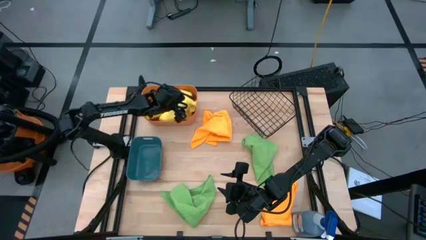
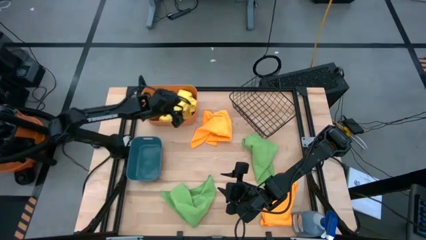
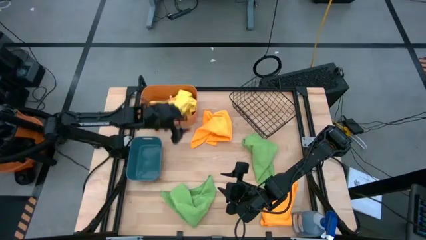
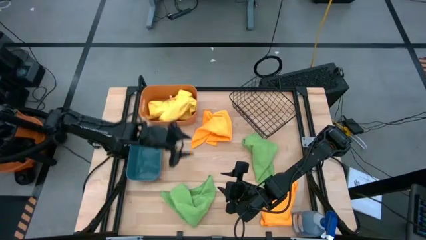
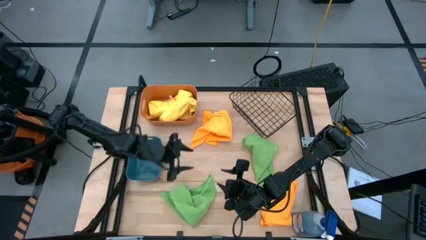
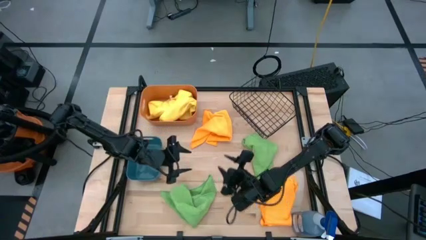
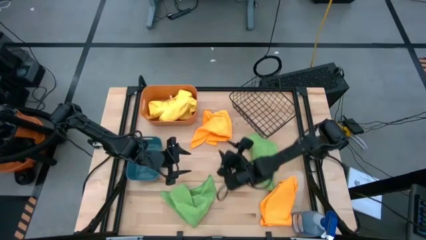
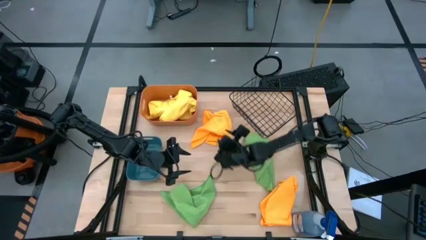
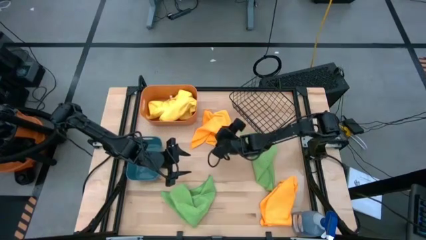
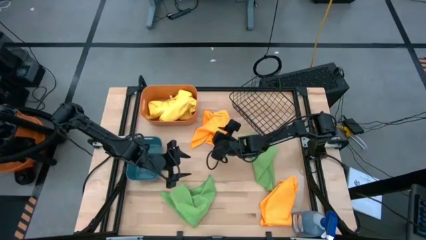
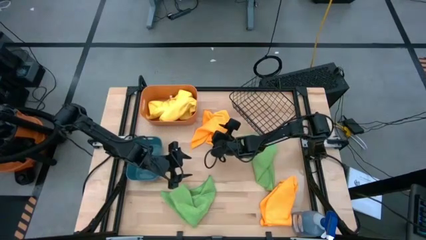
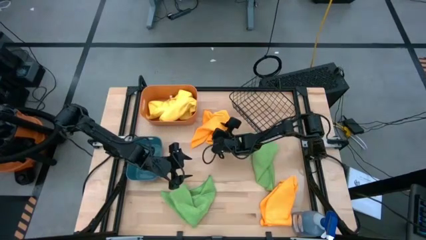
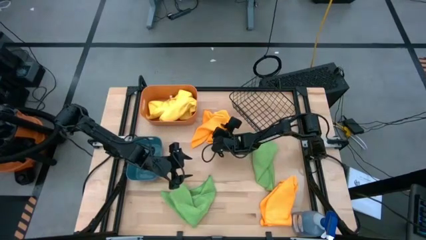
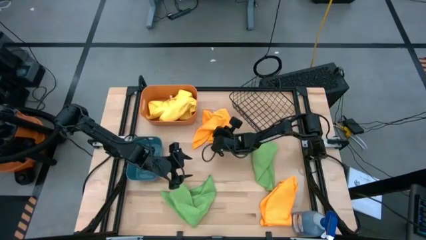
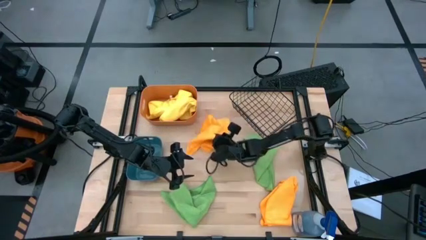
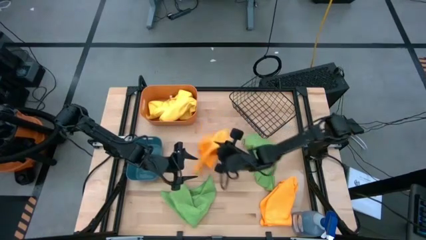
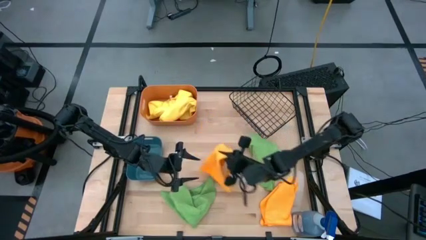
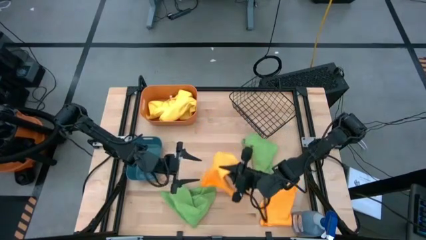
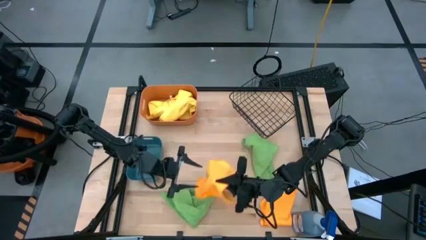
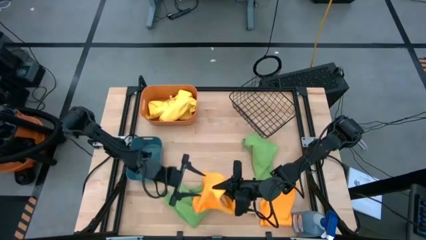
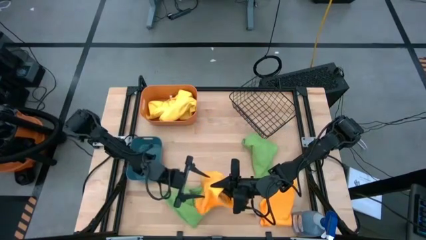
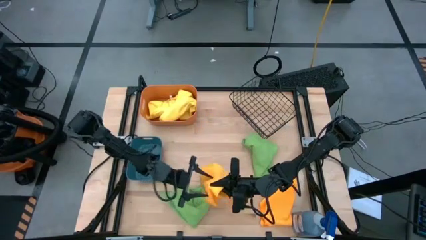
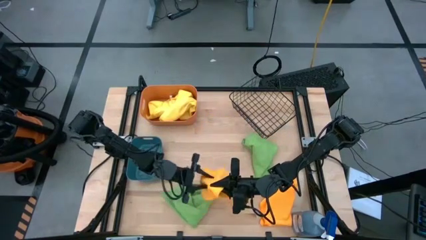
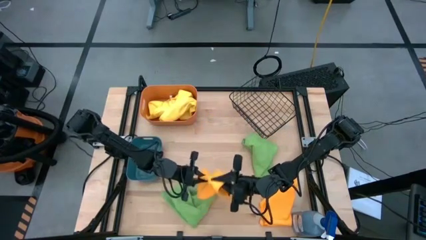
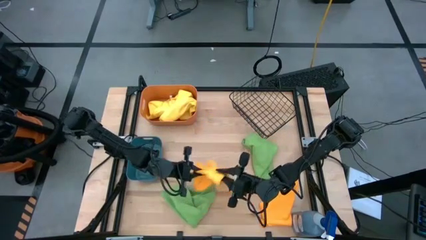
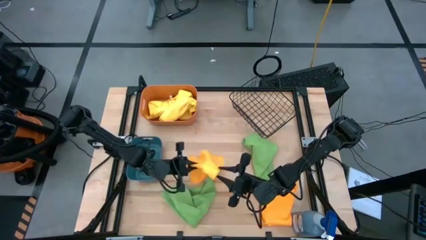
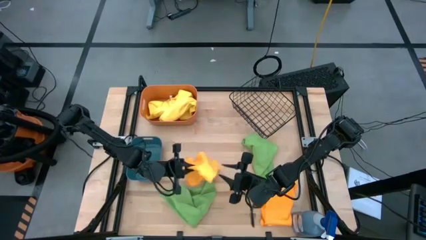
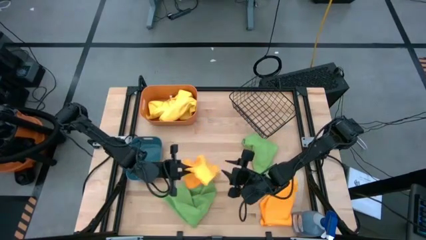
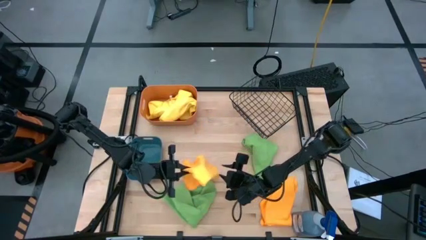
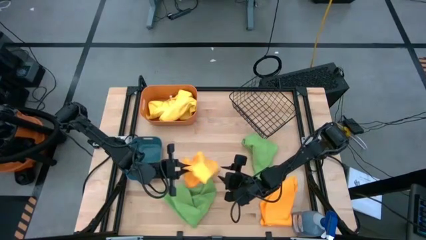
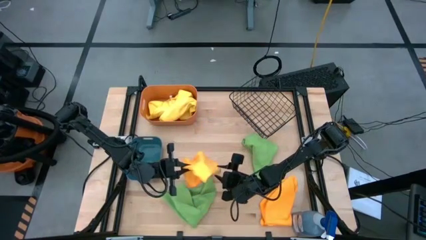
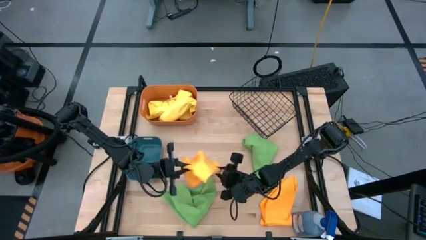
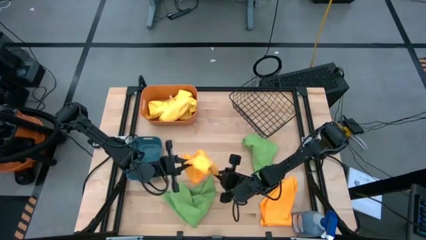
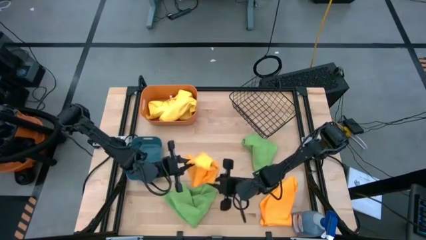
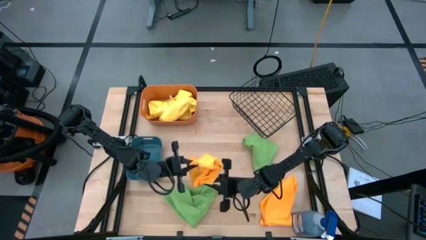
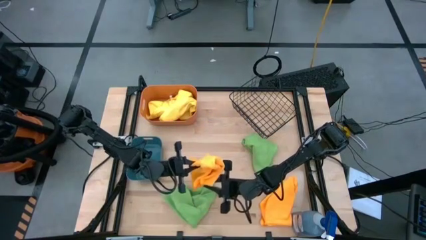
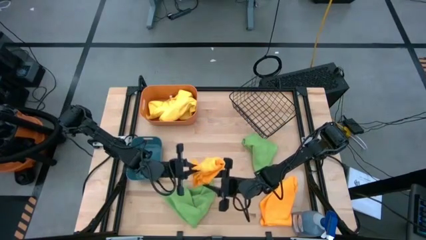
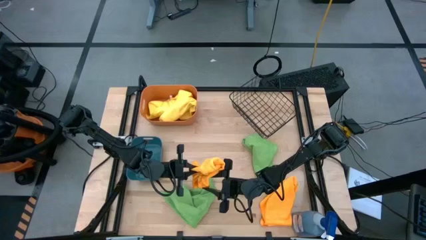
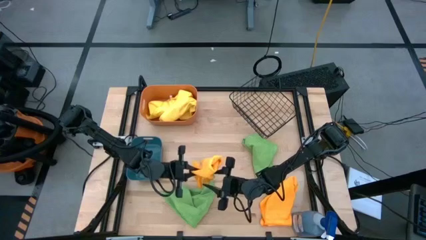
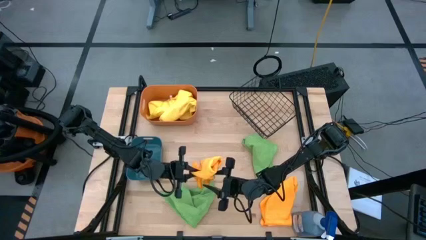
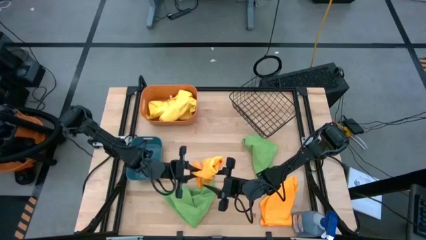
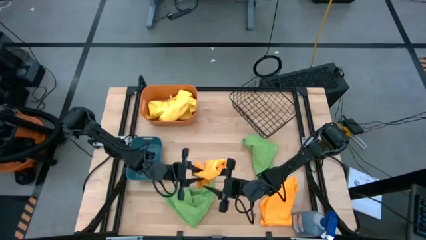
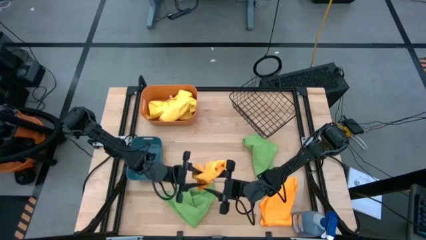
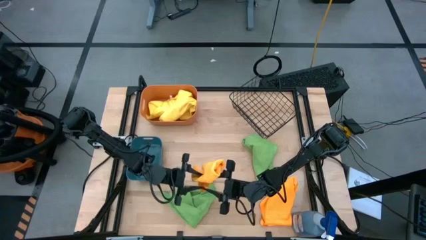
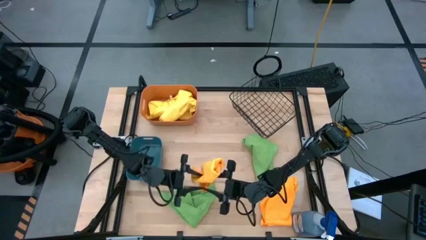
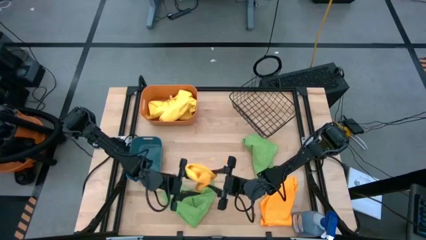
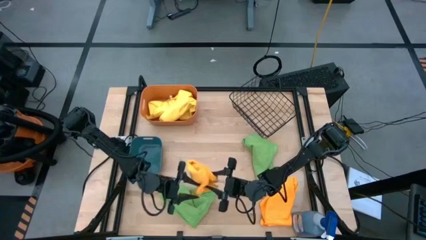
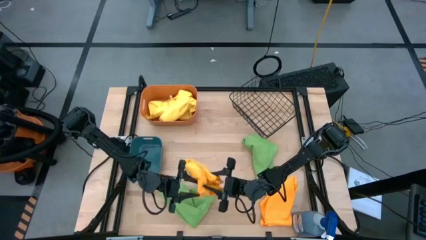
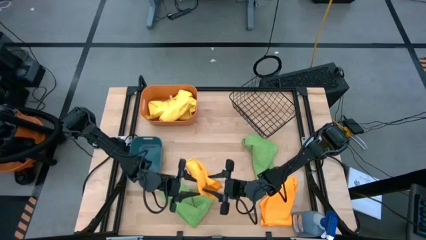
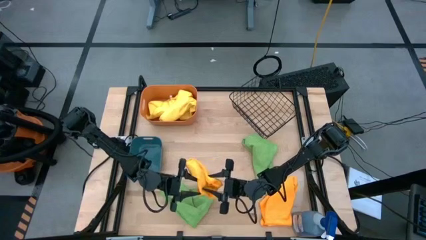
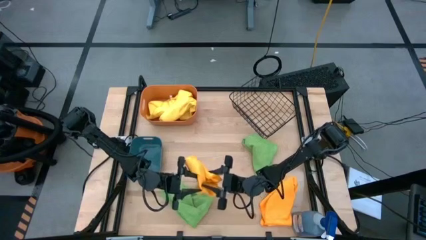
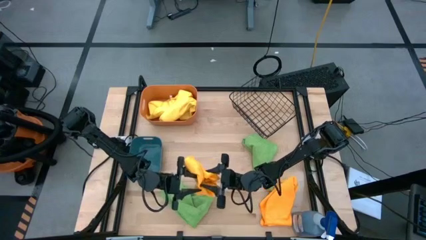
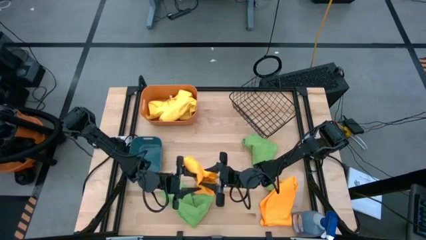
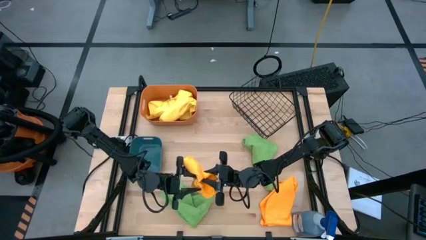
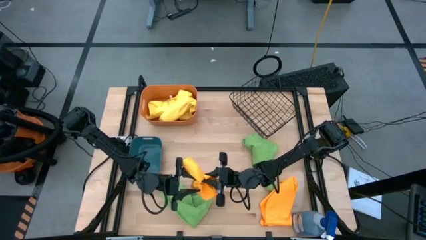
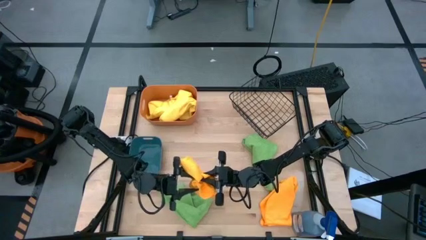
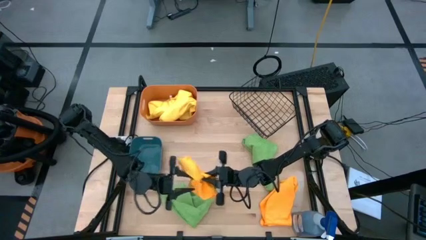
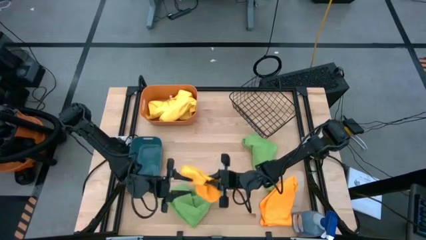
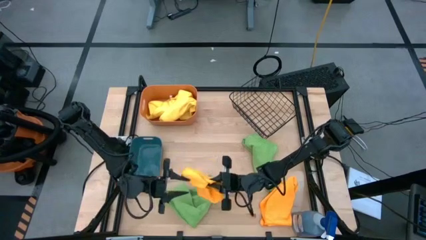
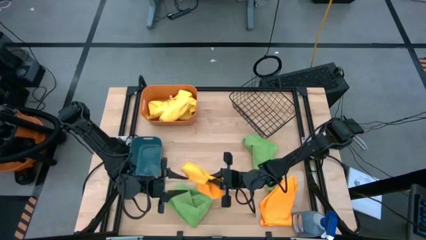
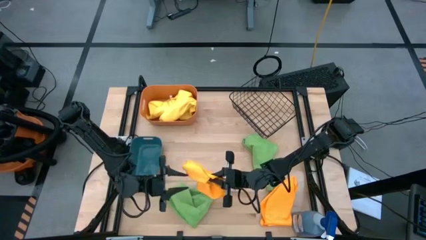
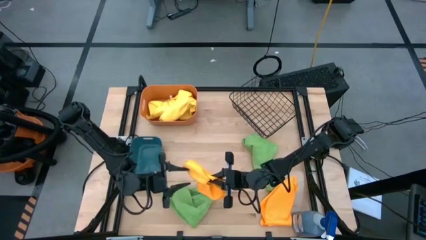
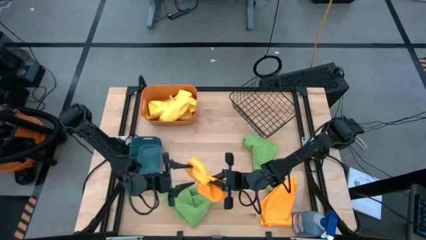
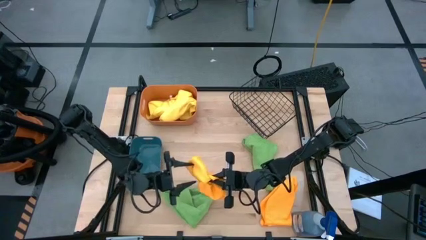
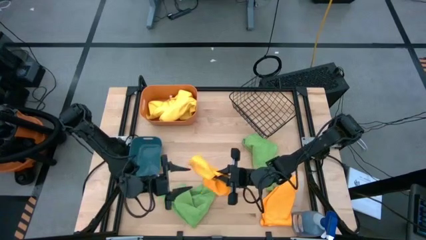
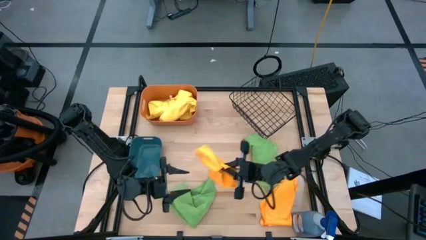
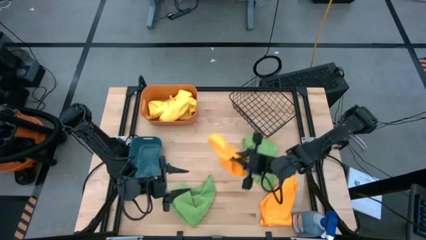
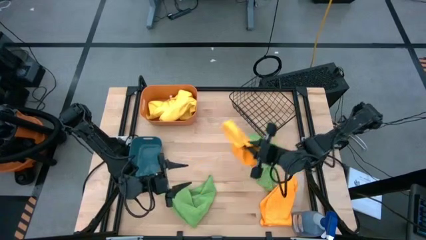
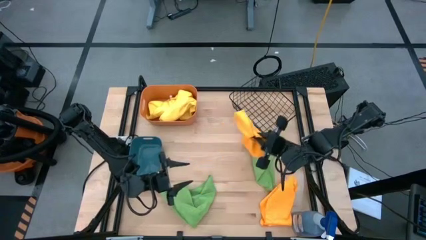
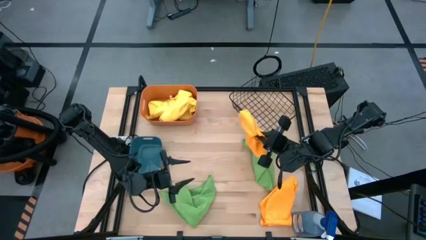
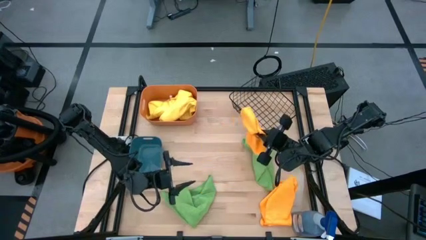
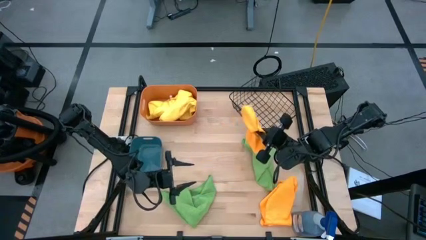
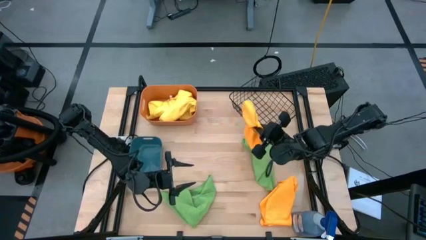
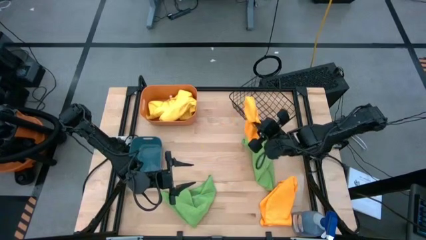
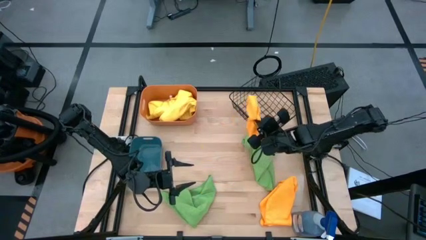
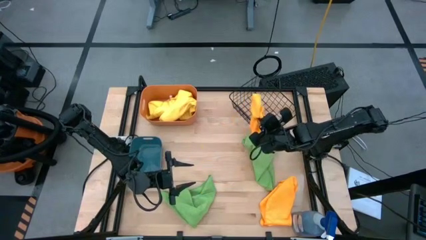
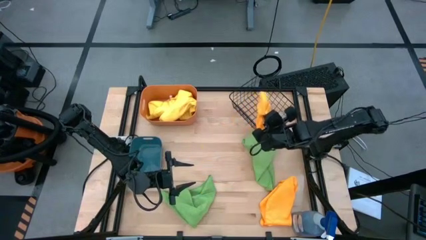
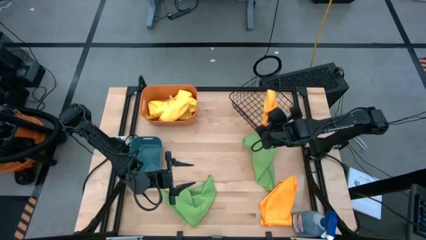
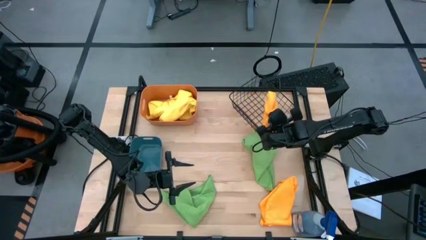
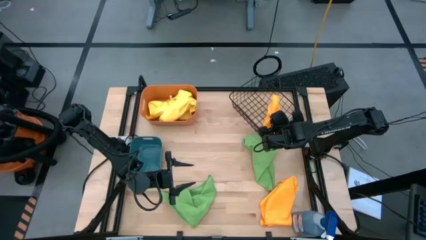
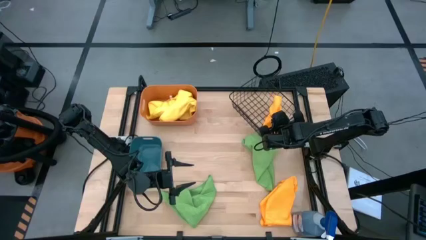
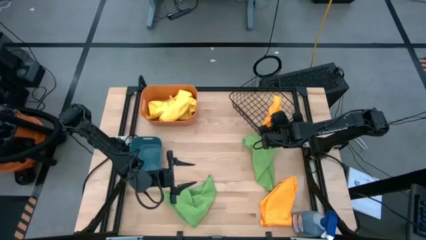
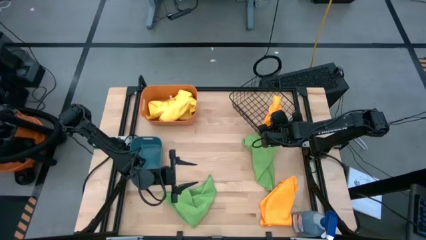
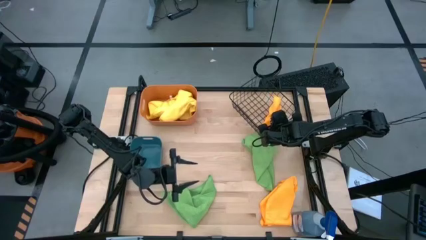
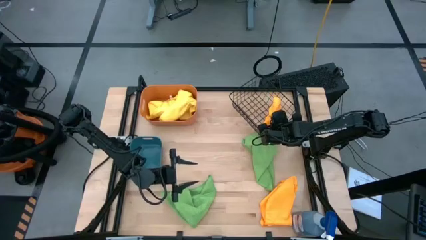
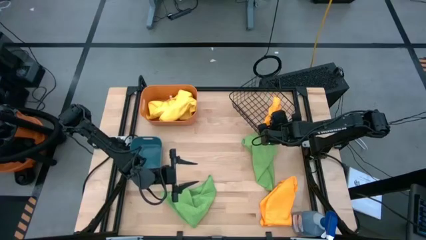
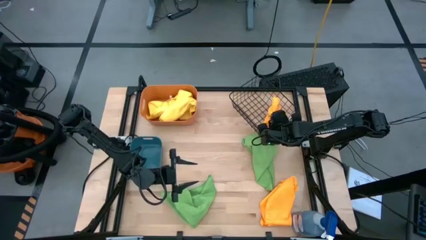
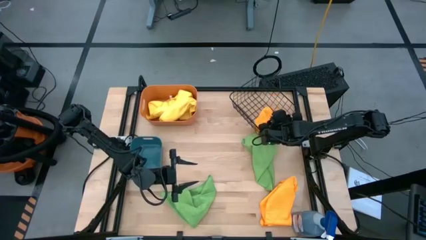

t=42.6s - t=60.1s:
Task: Sort microfiber towel by color & place in baskets
Put the top orange microfiber towel into the metal wire basket
